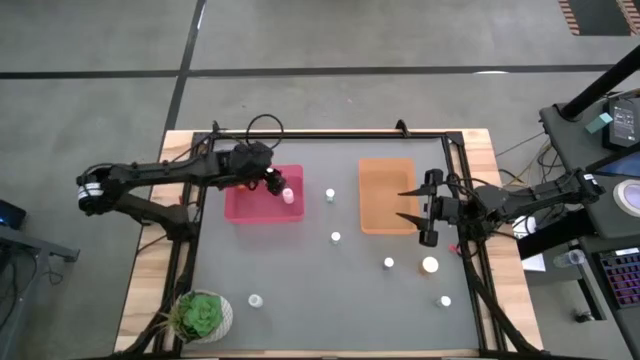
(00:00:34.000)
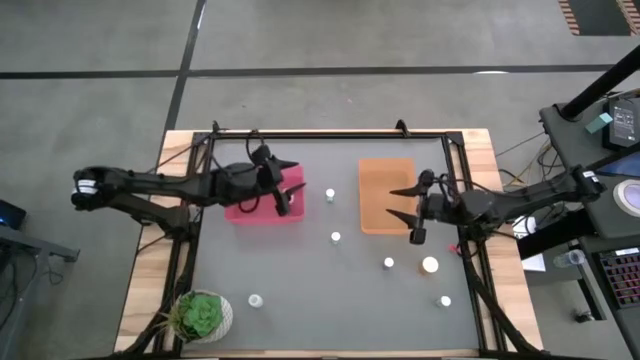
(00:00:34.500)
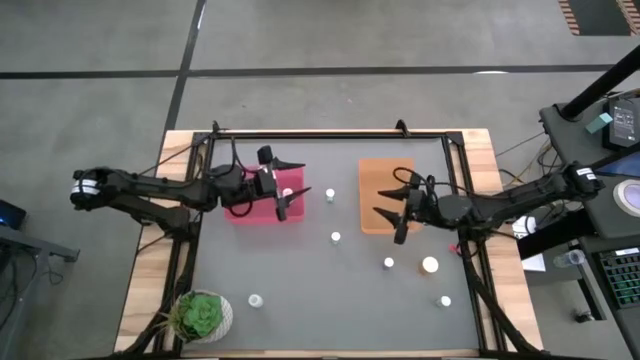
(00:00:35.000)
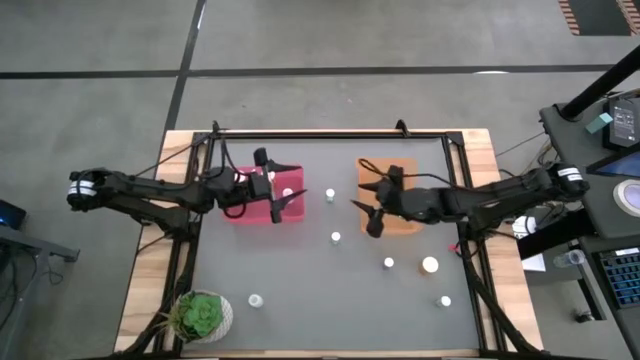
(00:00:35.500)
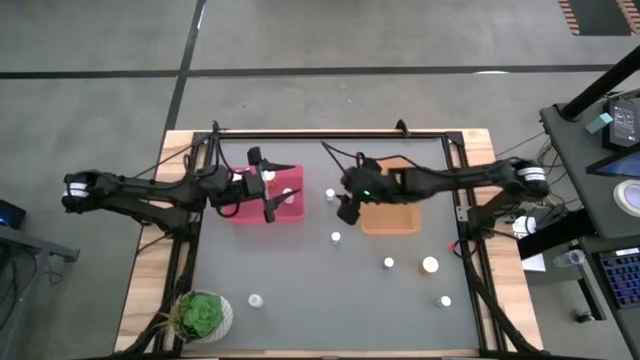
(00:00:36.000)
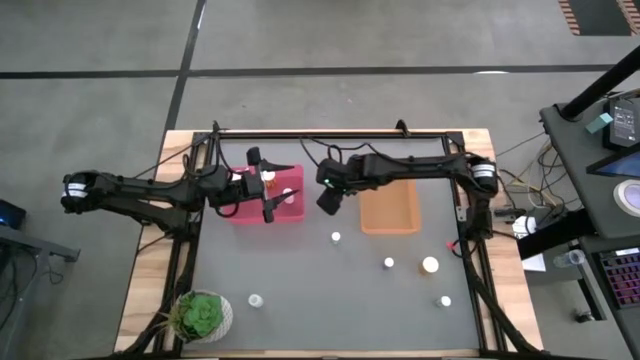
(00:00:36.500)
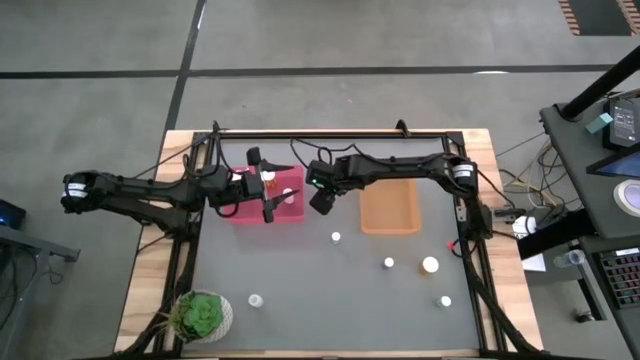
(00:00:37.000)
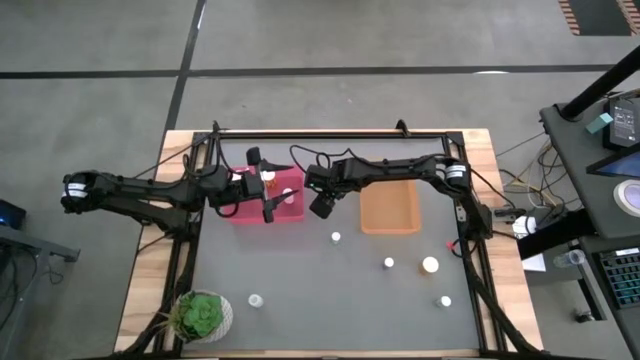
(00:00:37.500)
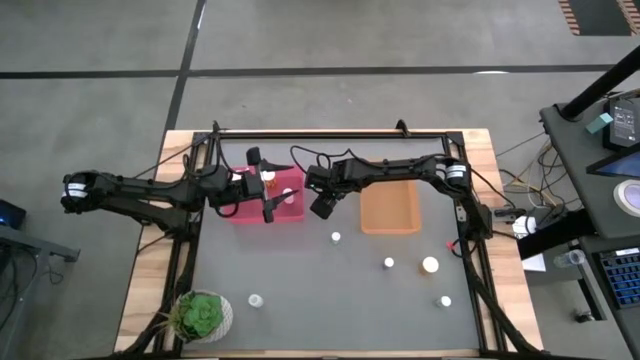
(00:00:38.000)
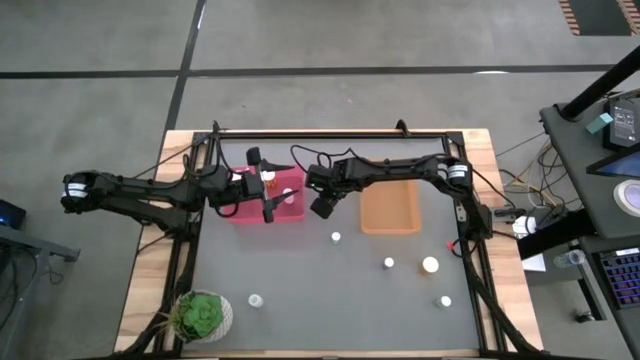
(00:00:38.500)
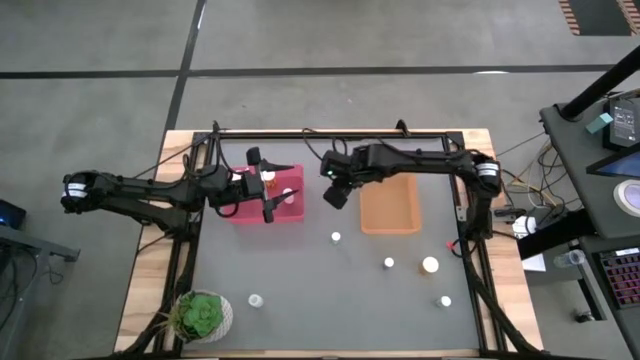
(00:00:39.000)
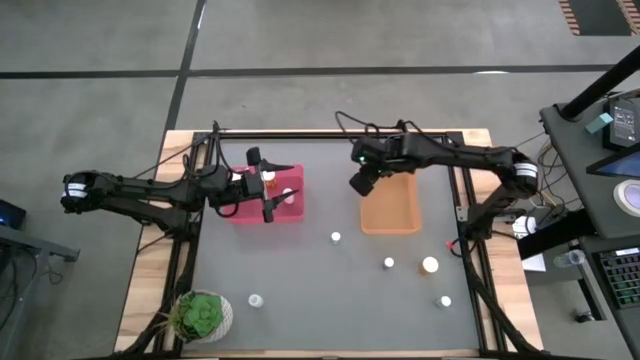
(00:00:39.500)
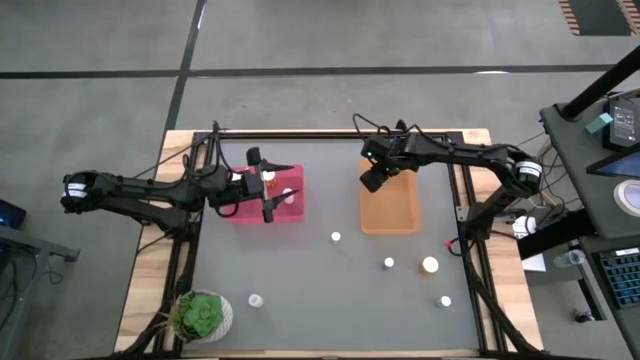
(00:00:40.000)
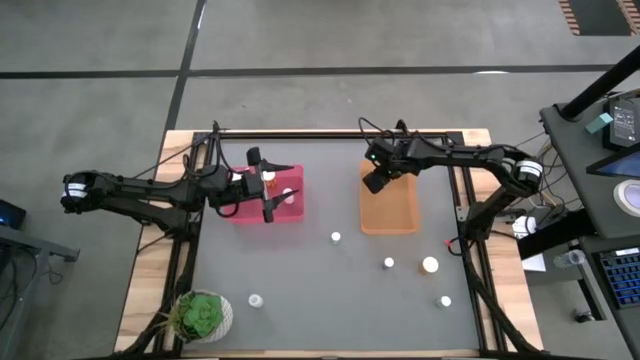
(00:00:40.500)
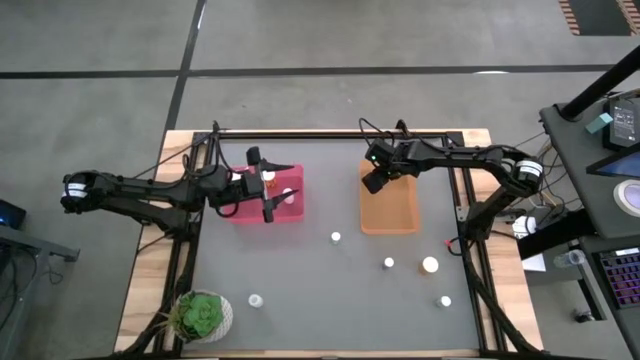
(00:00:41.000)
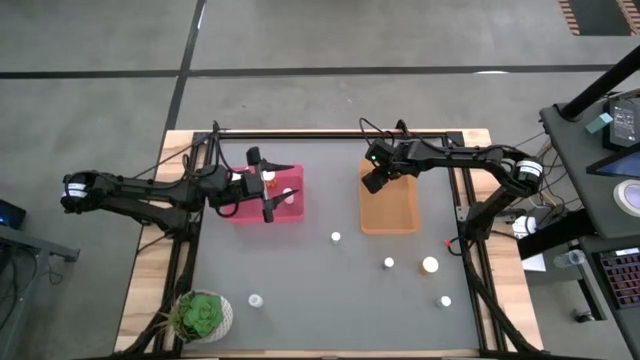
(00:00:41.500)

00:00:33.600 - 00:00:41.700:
Task: Pick and place medicine bottles into bin by pill shape (circle, oval)
Put the top blue pill into the orange bin

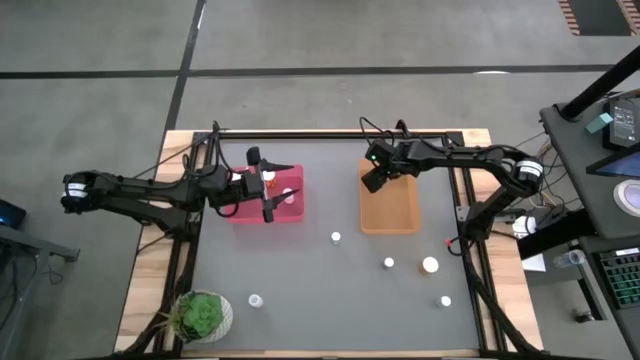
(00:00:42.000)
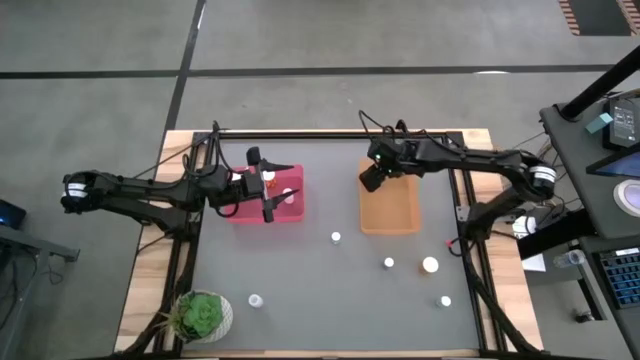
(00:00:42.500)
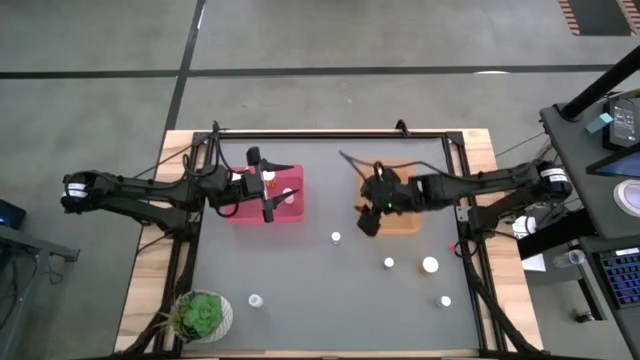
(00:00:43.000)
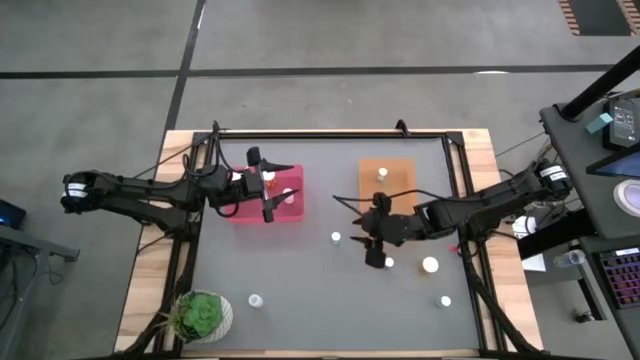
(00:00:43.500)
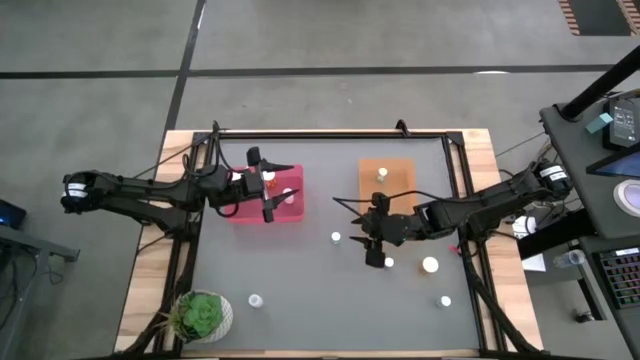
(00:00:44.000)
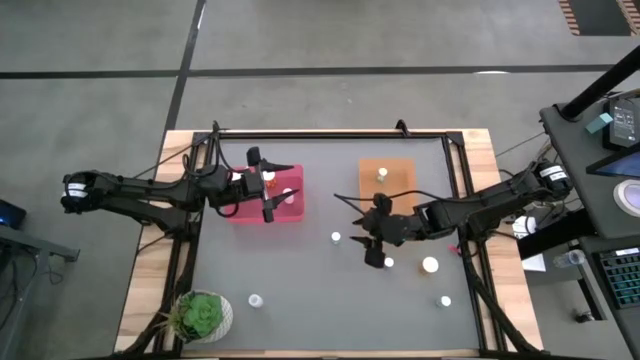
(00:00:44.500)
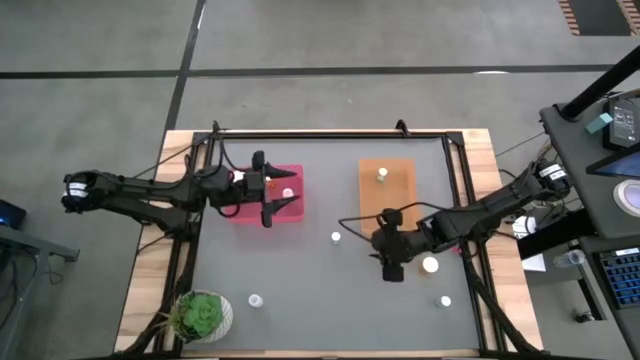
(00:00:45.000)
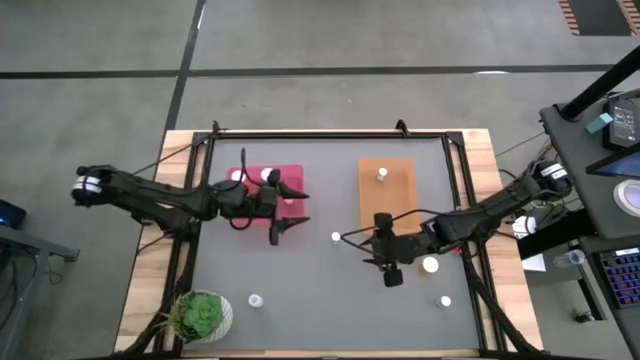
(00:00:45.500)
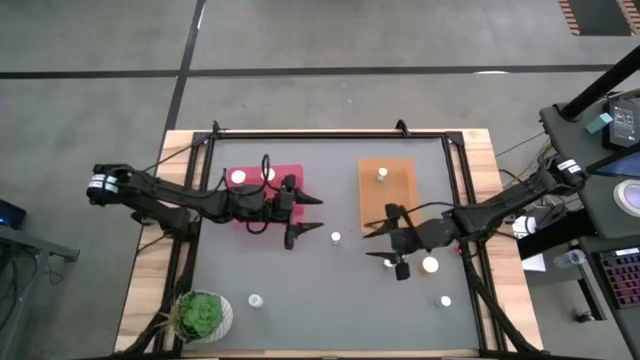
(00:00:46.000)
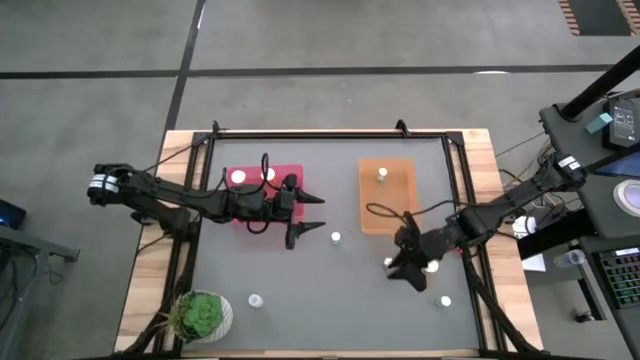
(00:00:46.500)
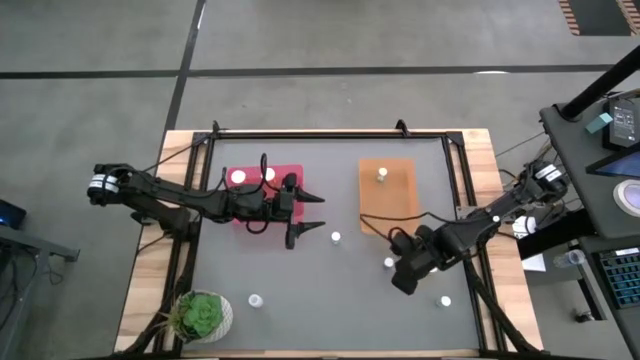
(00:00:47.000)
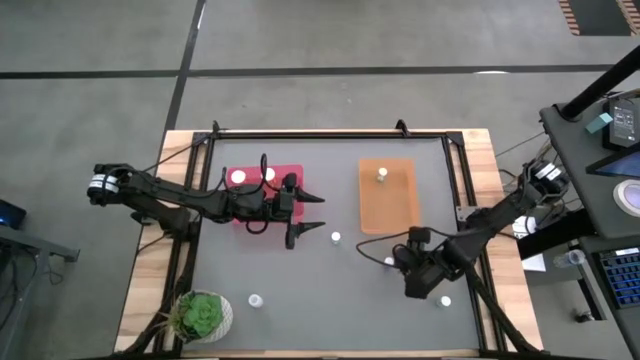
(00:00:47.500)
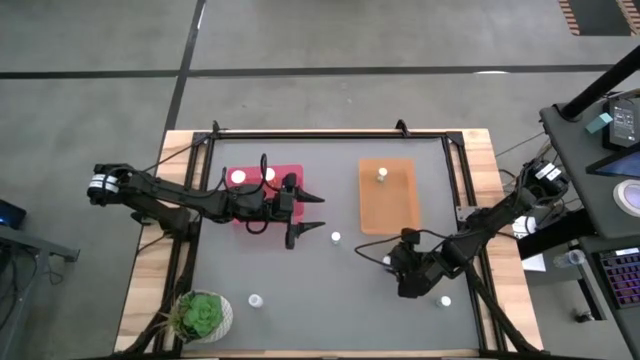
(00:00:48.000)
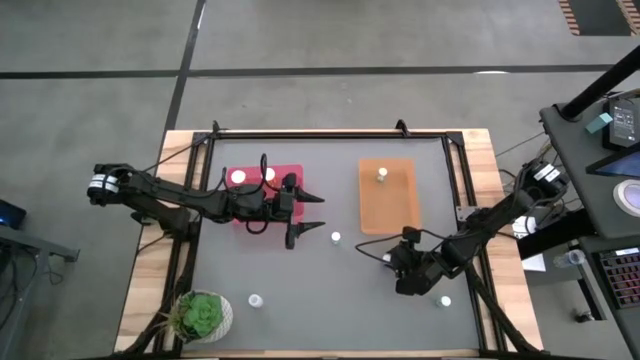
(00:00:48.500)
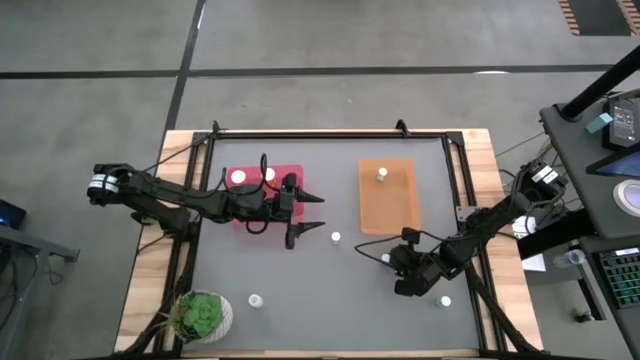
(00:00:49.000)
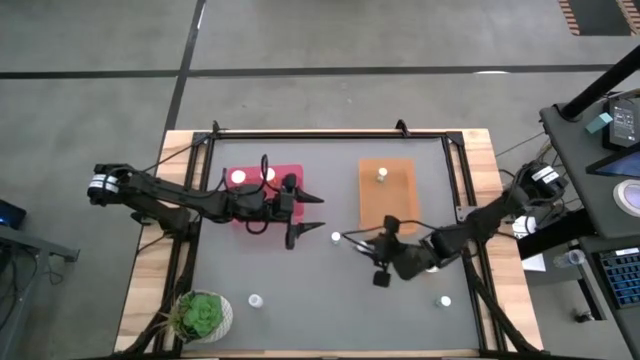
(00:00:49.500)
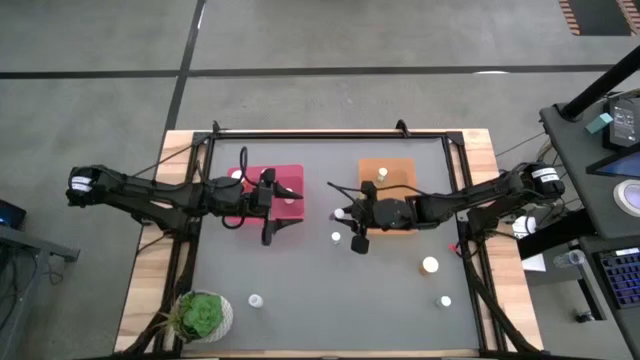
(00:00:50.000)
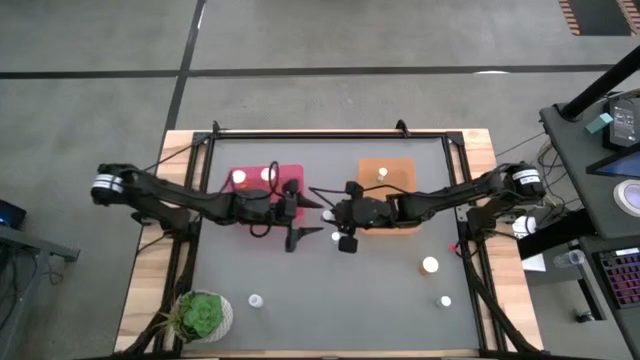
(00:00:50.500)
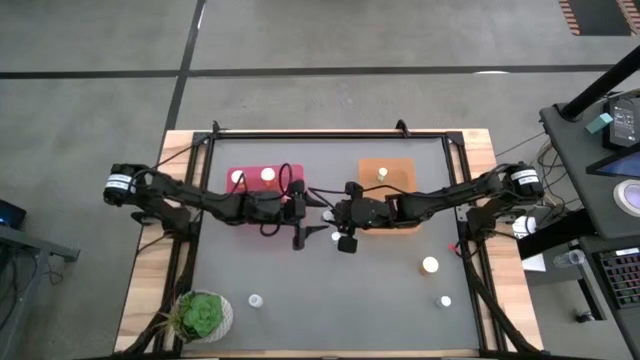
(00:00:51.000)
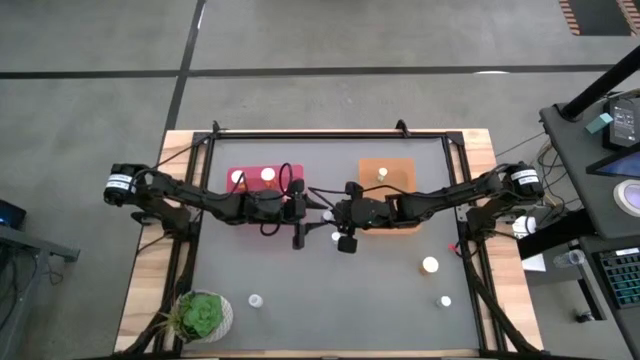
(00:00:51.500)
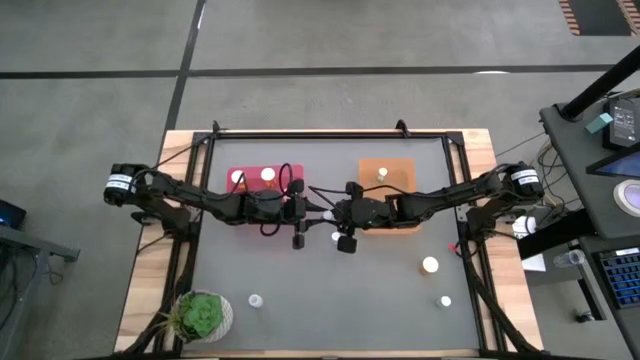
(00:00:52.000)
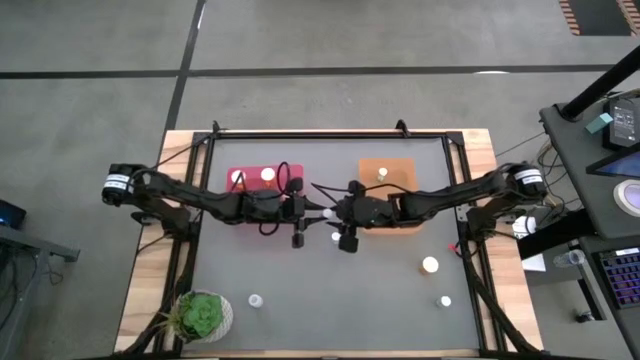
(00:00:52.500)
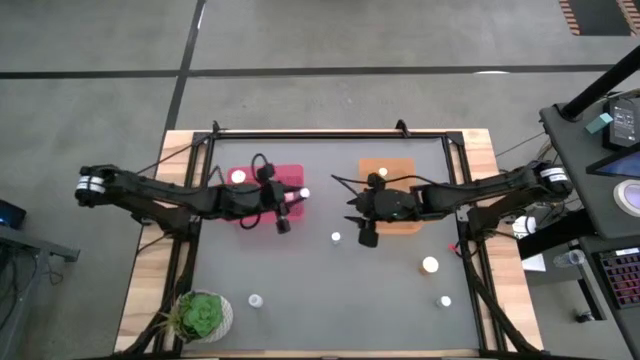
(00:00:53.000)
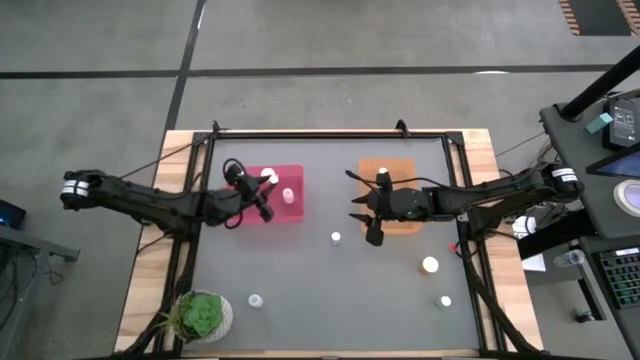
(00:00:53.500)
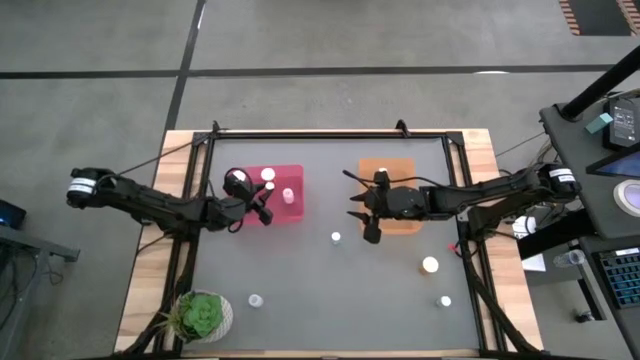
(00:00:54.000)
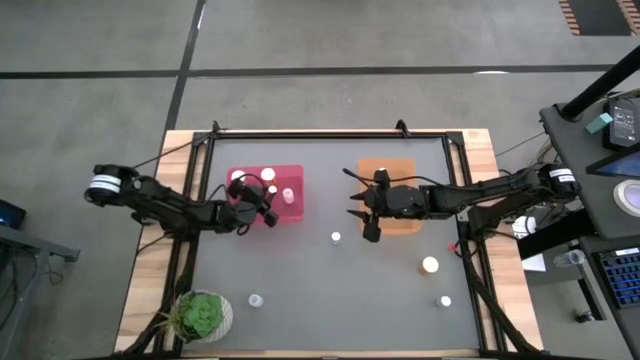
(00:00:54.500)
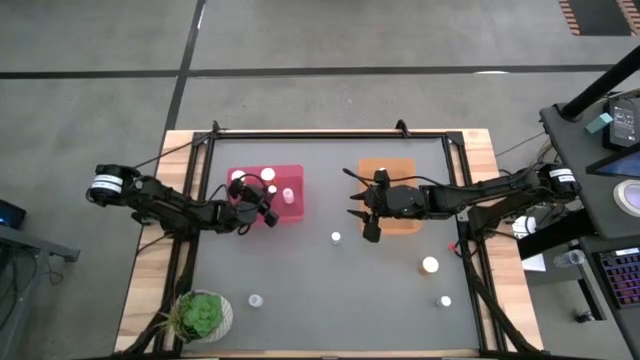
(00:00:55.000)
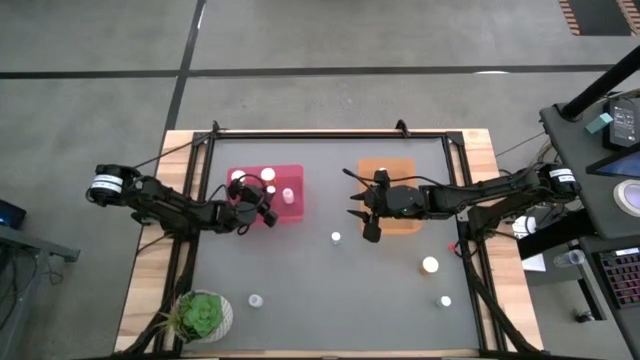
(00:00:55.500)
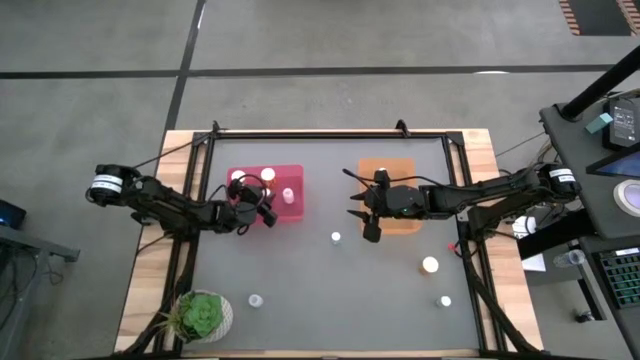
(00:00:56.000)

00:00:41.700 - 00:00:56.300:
Put the pink pill into the pink bin
